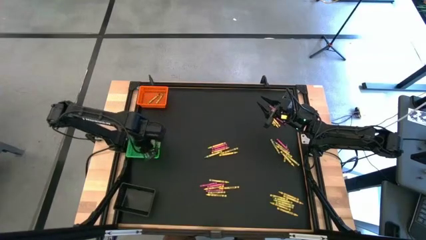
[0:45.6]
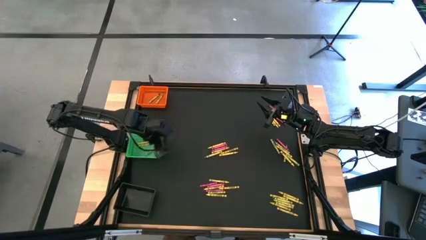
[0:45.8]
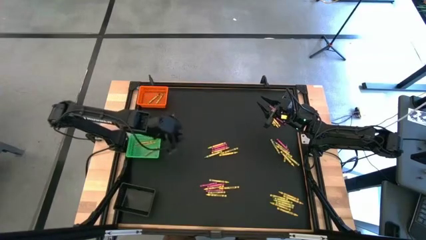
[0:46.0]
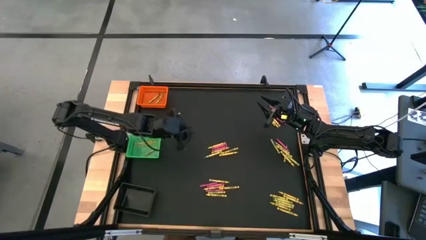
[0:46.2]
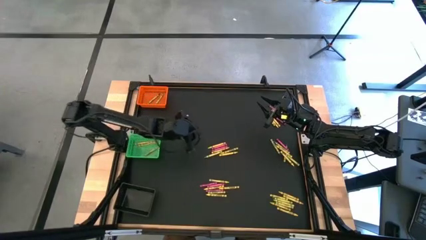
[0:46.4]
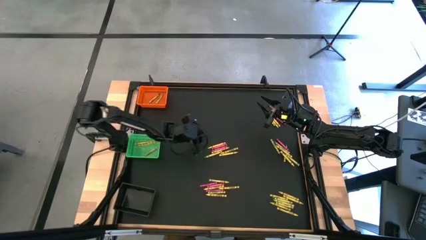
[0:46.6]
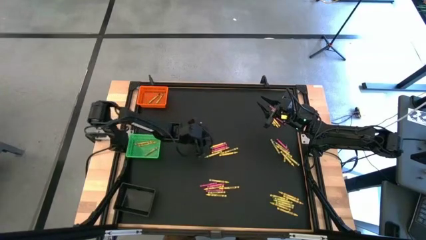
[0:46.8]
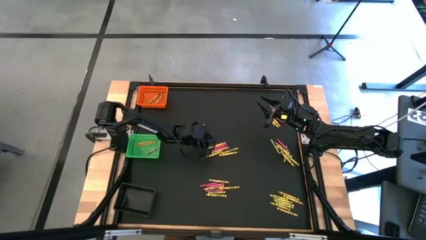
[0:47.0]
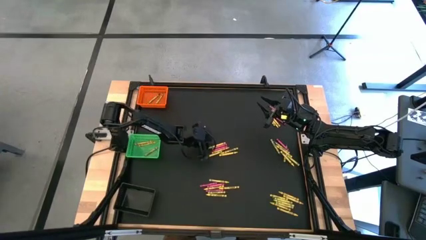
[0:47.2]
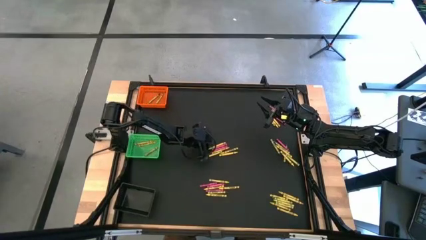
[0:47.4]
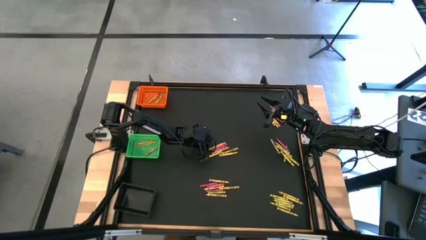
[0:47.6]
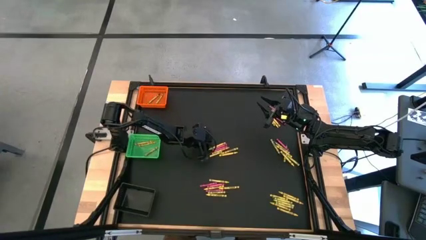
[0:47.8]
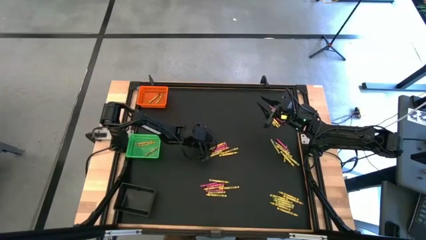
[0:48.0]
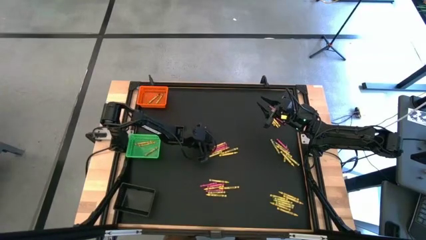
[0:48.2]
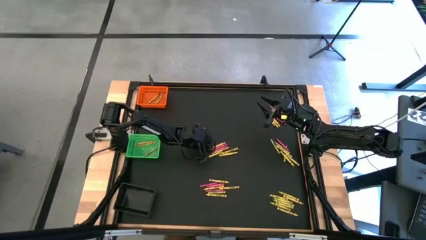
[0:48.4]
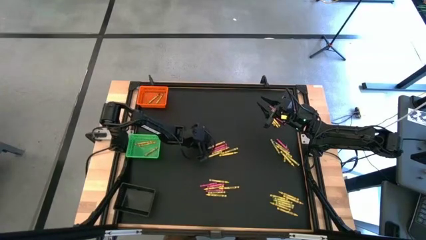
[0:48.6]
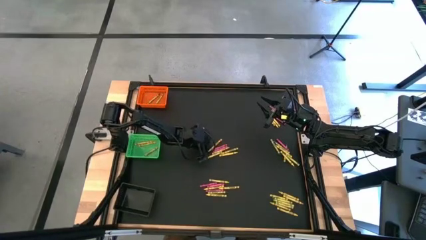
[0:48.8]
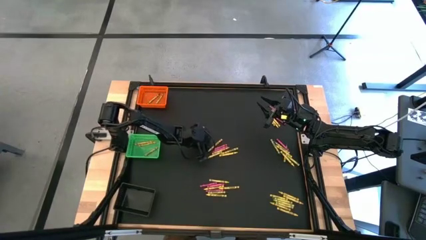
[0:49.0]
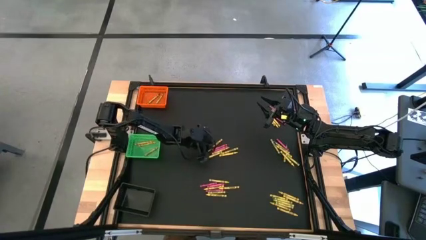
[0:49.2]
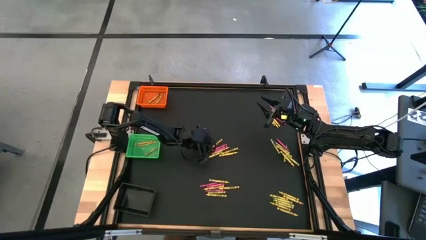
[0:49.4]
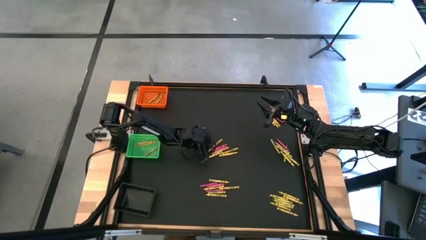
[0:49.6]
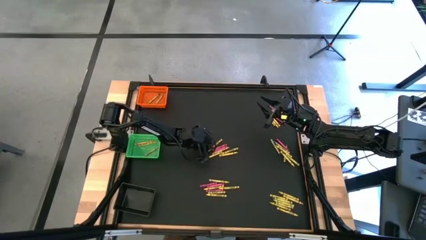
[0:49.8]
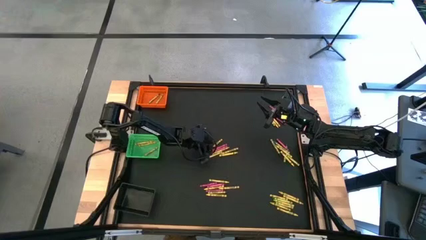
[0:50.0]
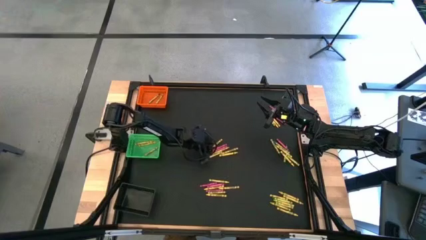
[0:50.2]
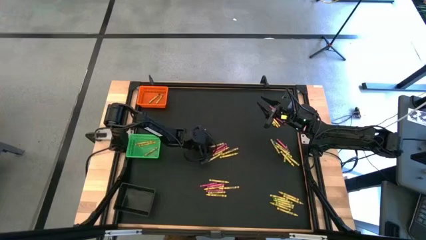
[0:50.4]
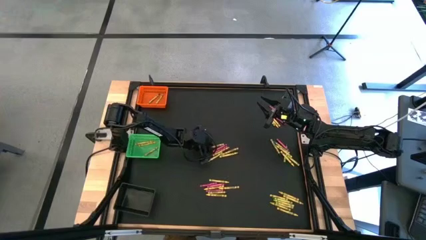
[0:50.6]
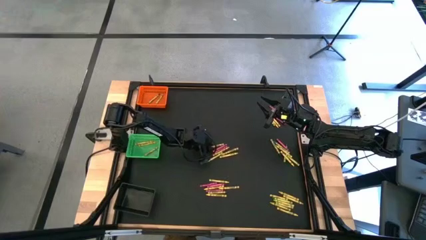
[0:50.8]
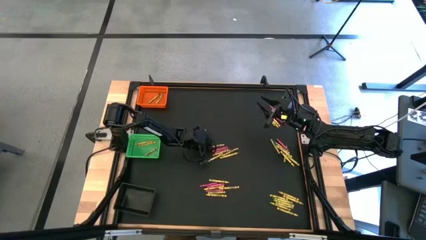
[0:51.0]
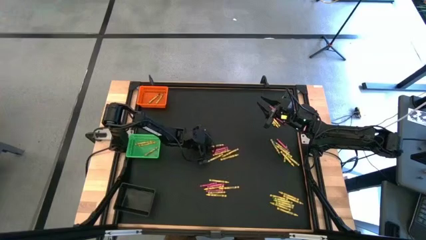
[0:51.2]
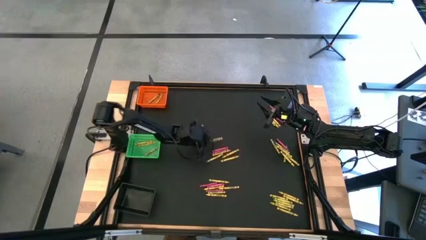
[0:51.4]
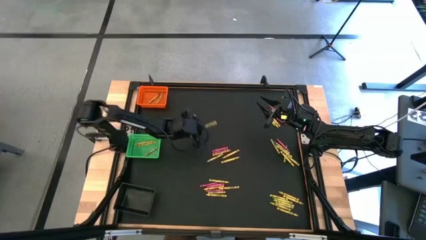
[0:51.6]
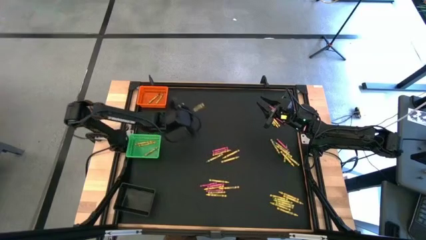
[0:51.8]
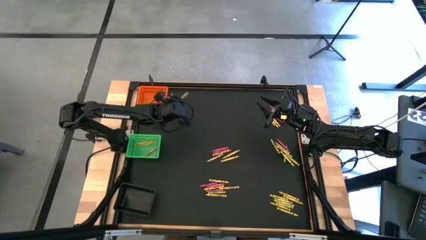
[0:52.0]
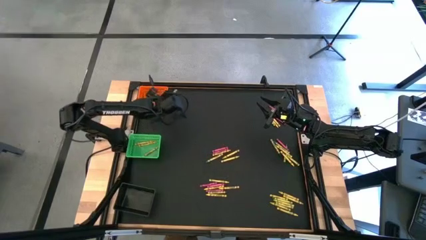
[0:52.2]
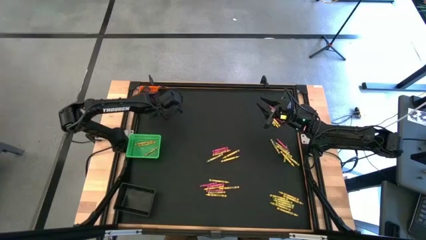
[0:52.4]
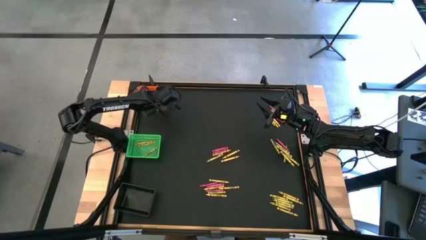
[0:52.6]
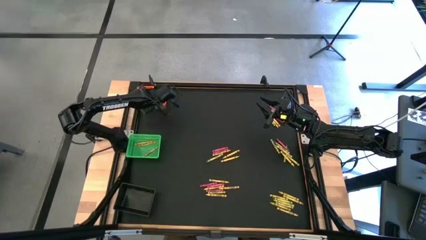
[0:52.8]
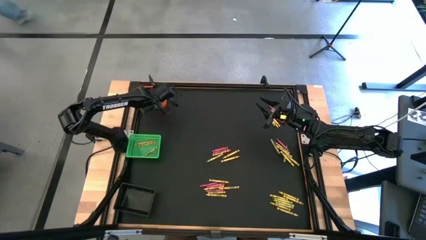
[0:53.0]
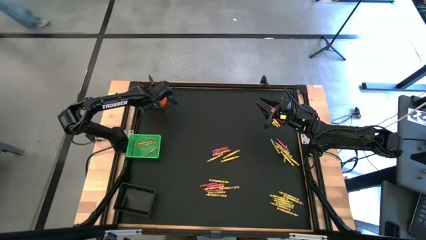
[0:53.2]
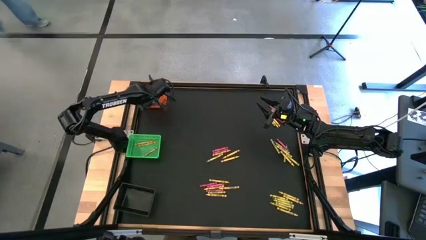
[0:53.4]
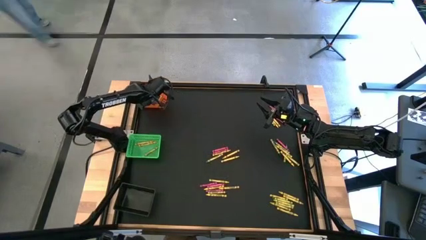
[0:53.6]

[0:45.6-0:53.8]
Task: Sort crayons
Put the yellow crayon into the green bin

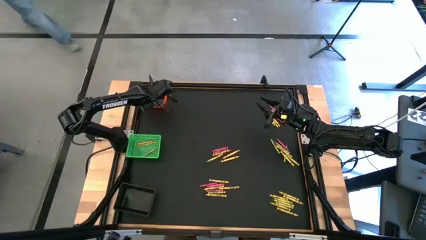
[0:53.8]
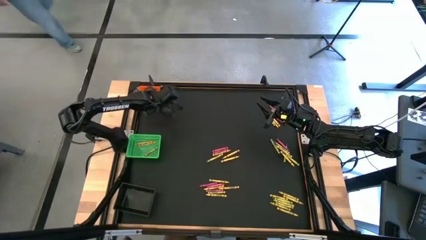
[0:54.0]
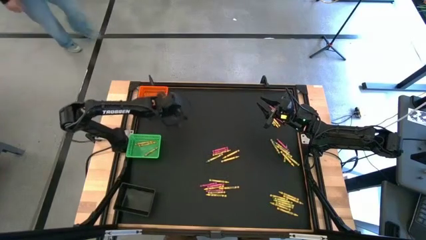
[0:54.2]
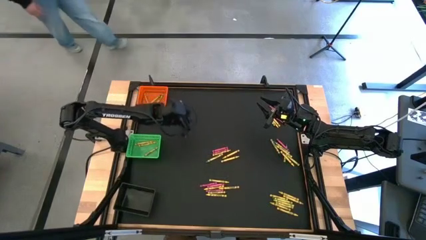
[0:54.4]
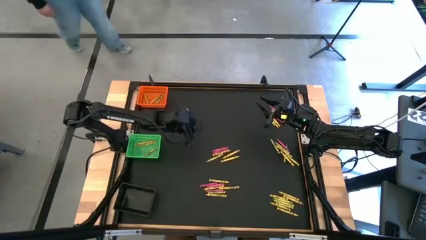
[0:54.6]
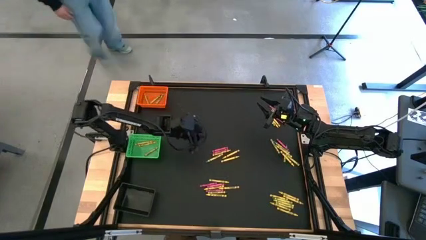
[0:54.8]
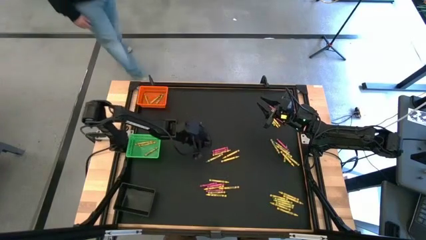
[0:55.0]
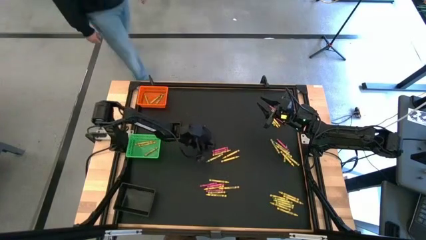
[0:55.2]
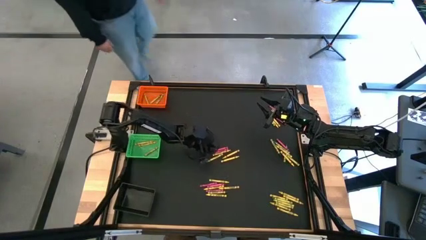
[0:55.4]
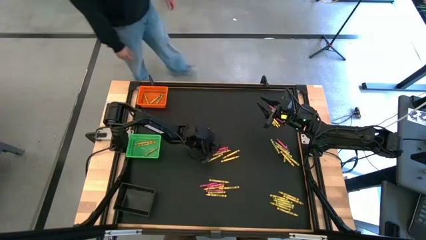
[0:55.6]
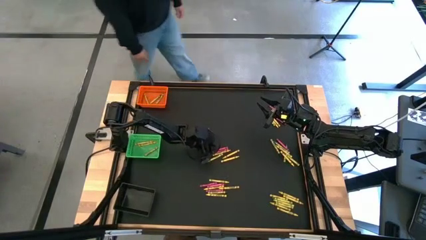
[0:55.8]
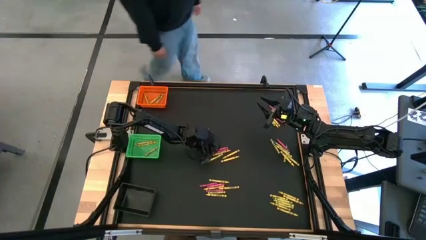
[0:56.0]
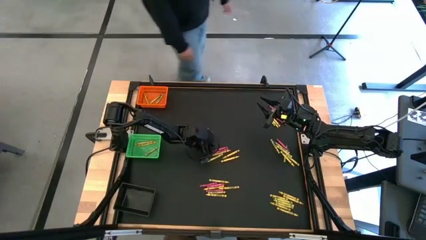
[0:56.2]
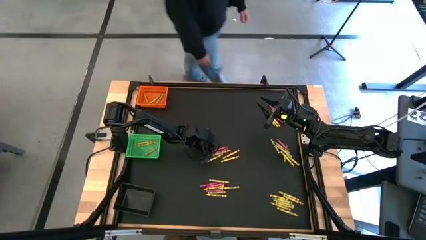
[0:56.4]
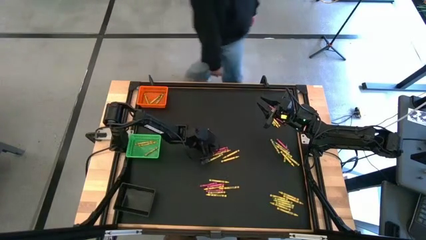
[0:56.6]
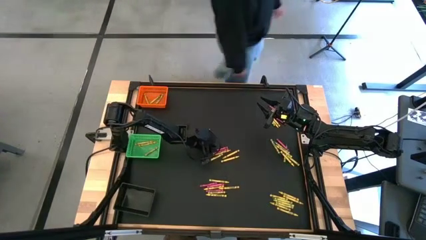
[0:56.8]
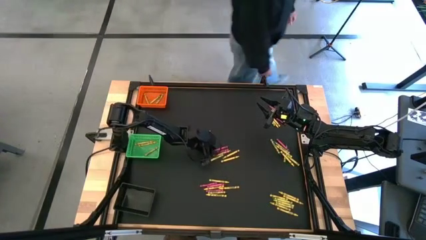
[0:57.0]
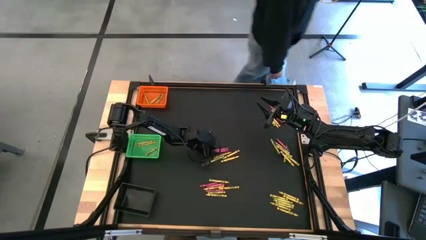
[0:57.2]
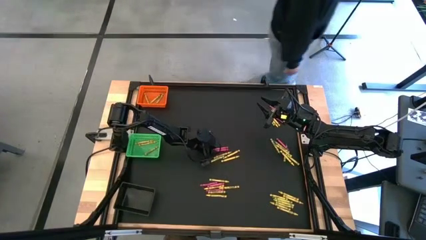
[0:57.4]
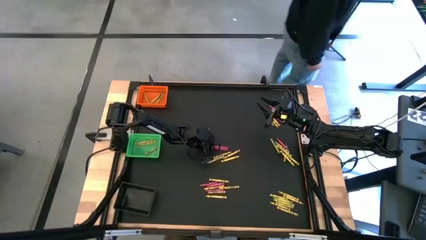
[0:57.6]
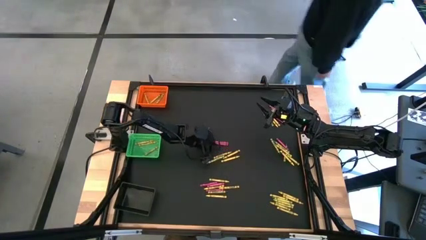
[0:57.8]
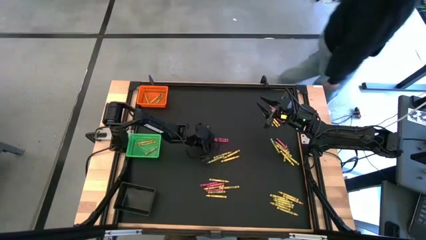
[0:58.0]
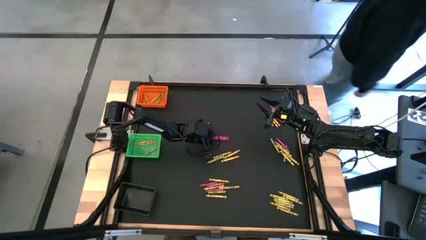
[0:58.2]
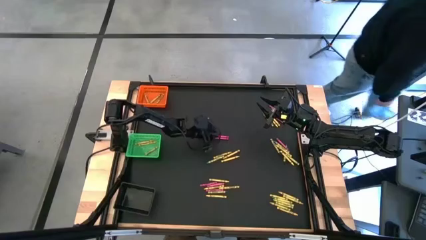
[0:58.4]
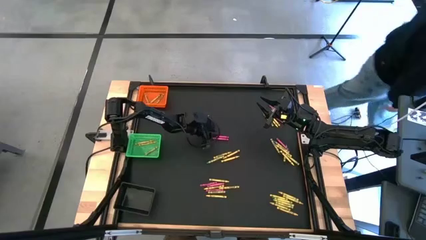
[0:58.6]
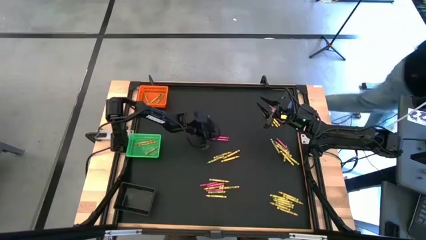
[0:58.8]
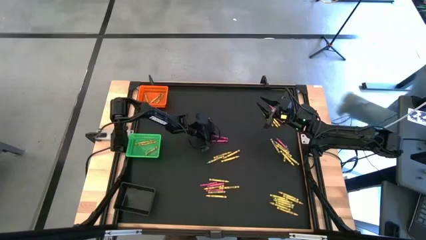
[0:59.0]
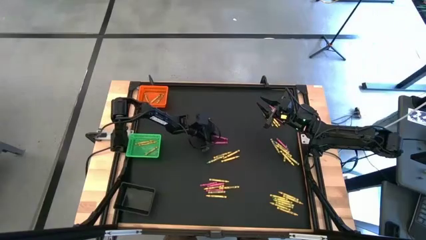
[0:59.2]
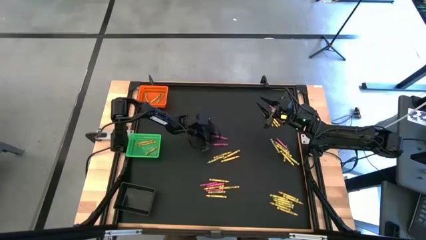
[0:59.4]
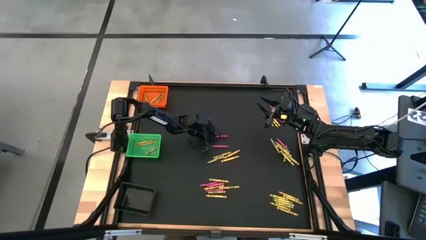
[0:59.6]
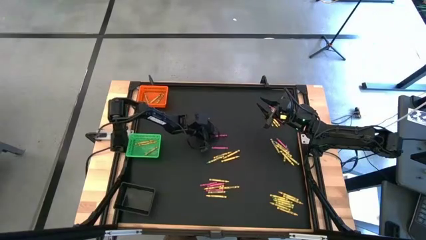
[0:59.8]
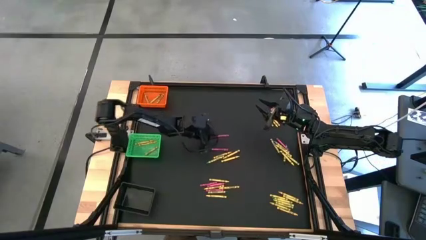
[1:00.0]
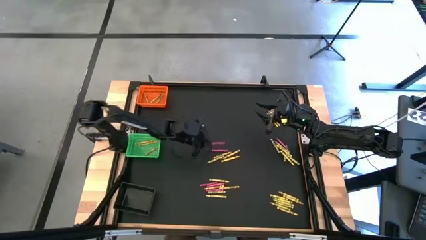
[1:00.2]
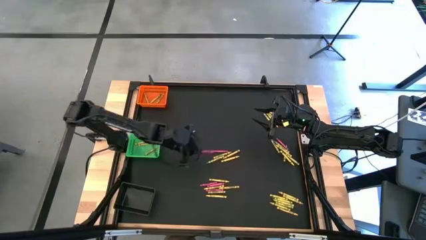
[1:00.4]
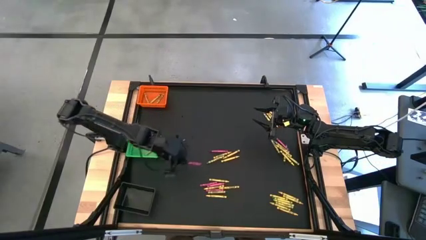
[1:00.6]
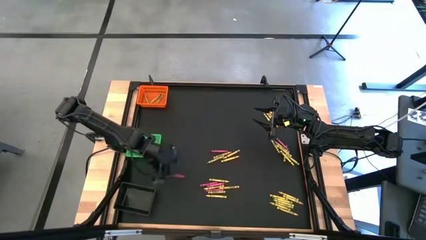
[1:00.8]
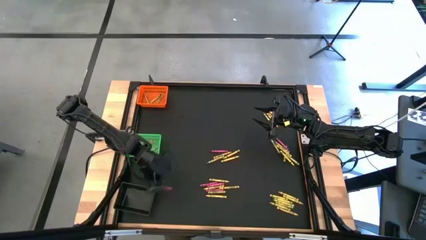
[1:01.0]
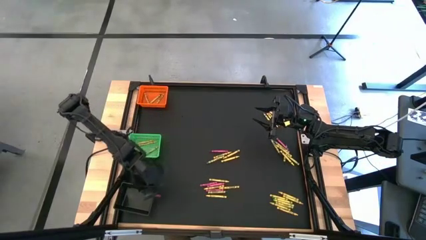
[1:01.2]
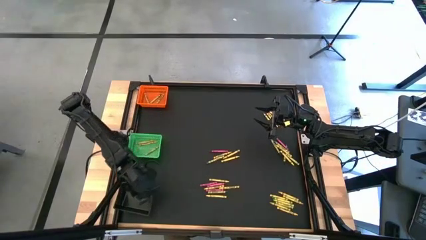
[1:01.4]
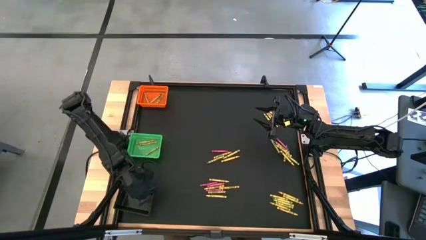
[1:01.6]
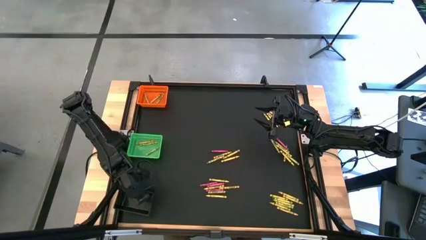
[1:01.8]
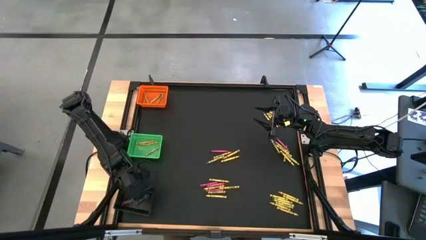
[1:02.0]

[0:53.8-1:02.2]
Put the pink crayon into the black bin
